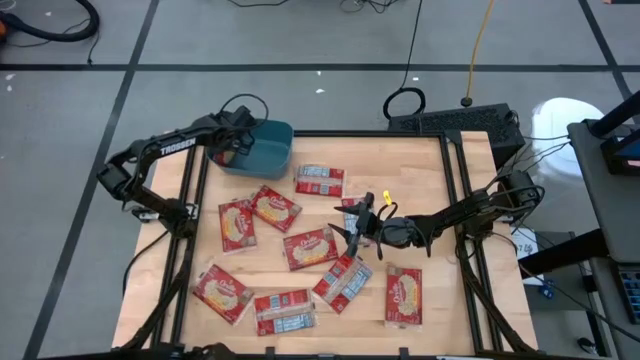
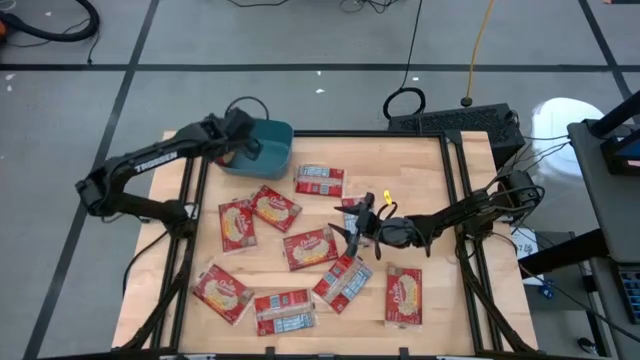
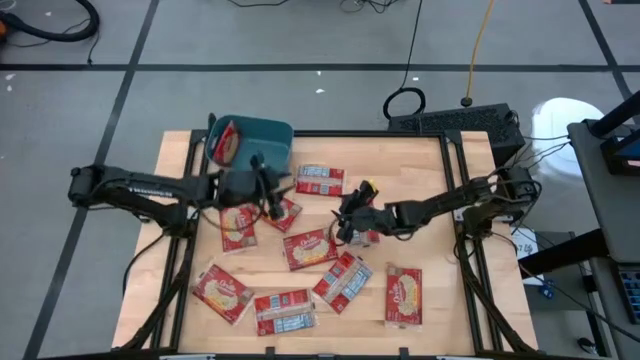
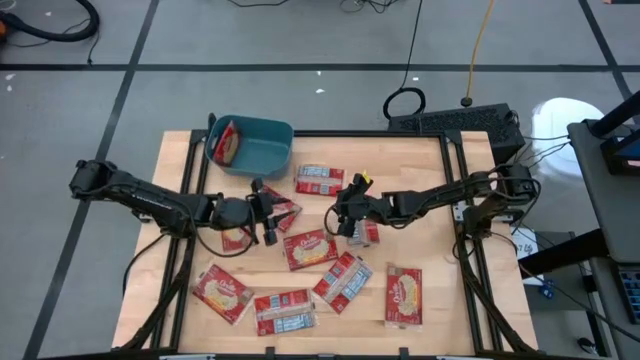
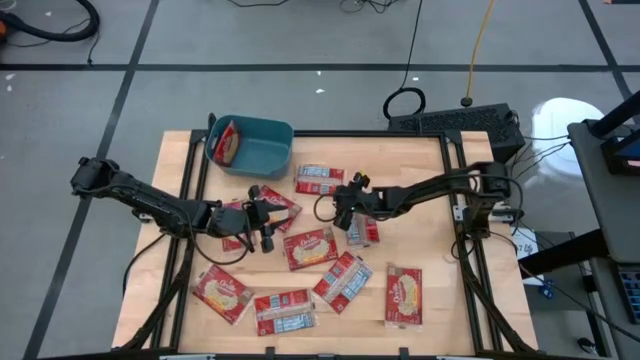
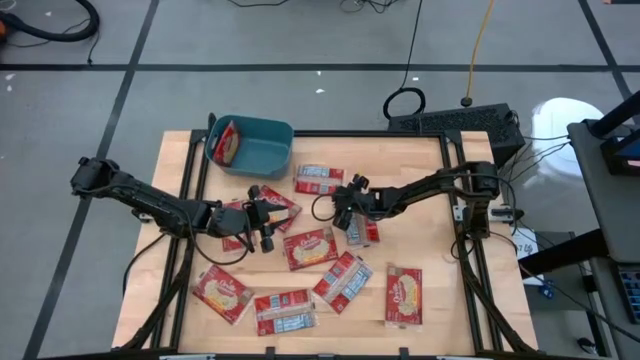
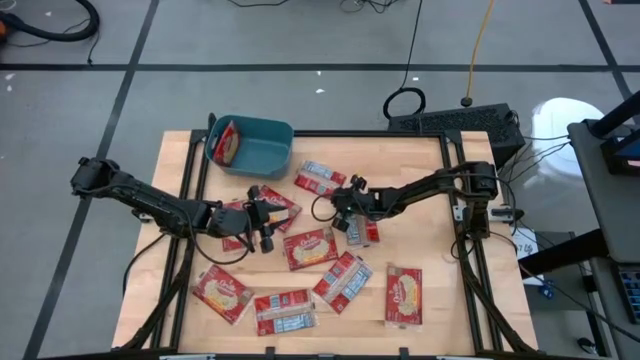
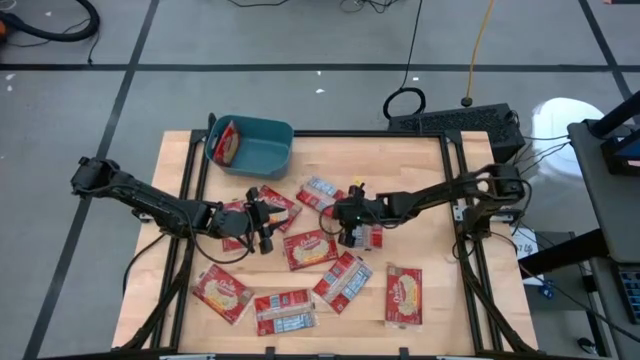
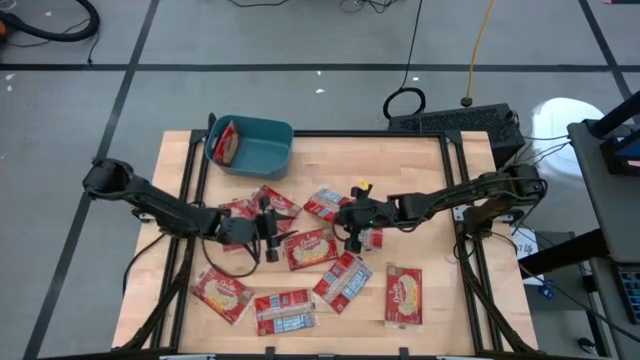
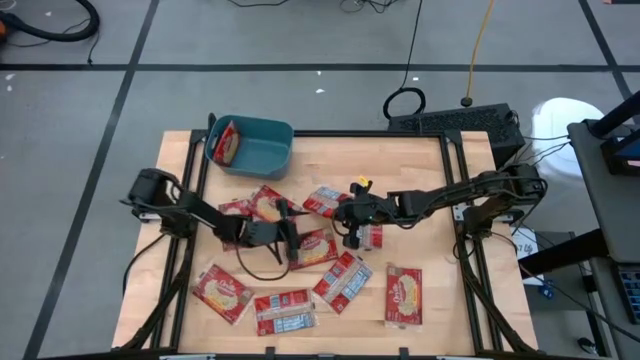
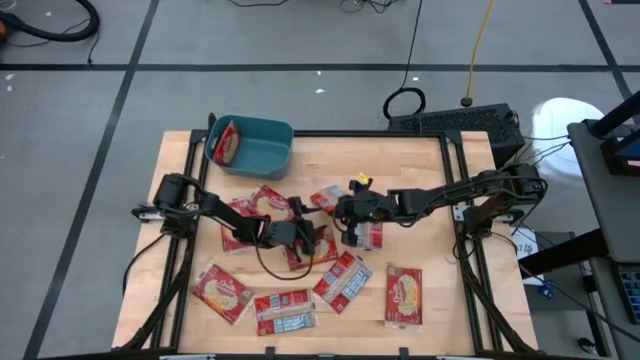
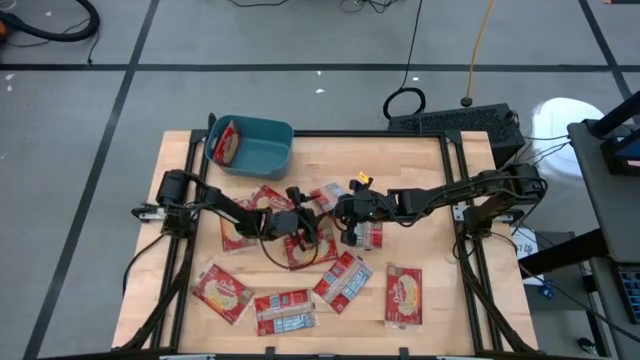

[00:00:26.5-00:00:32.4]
Task: Sort popcorn bags into baskets
Put the red popcorn bag into the blue bin

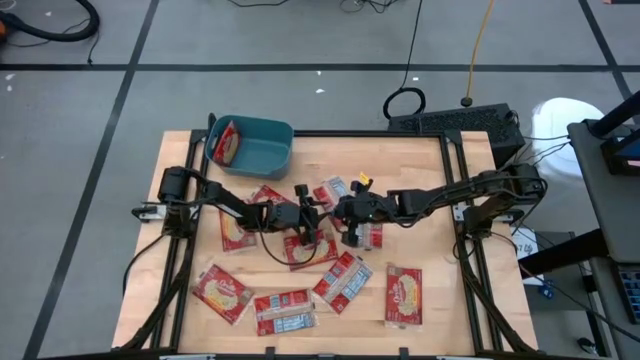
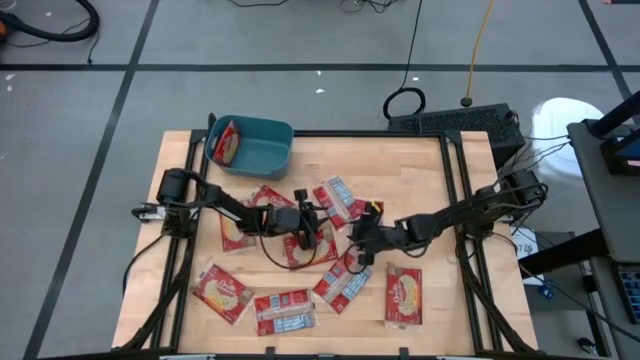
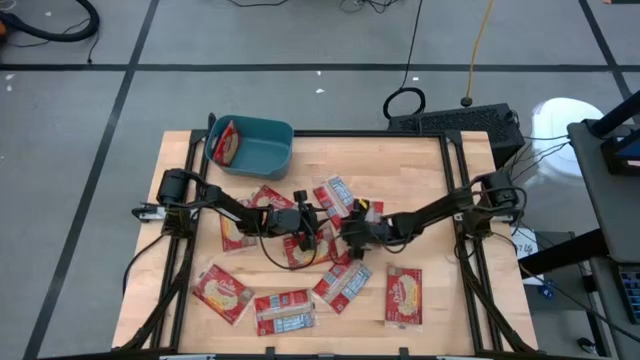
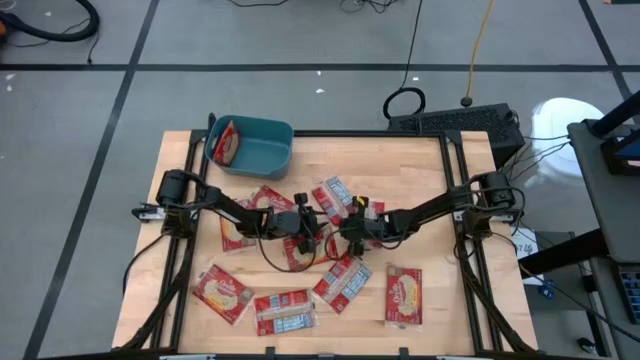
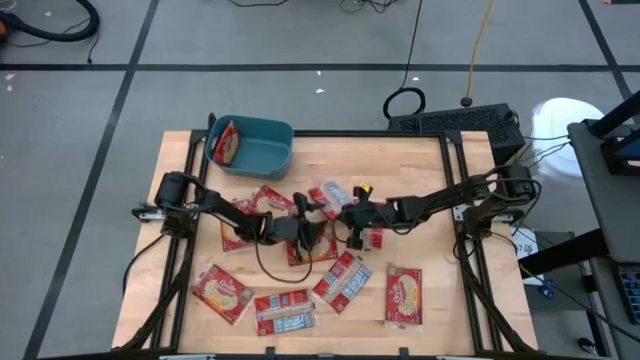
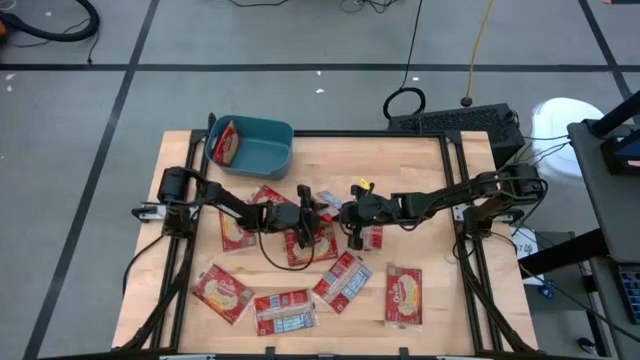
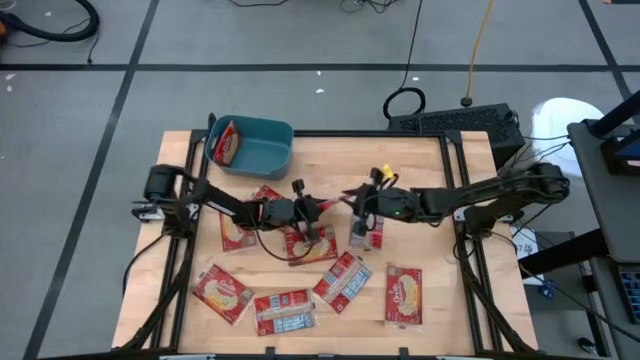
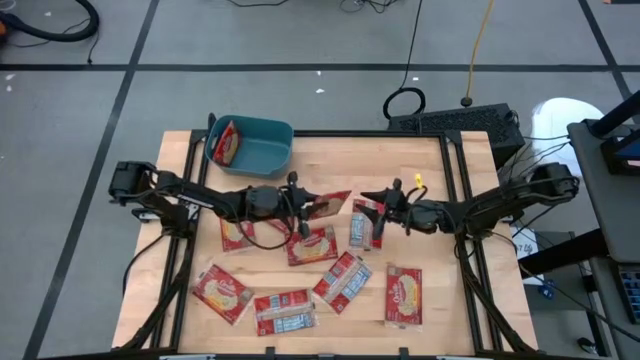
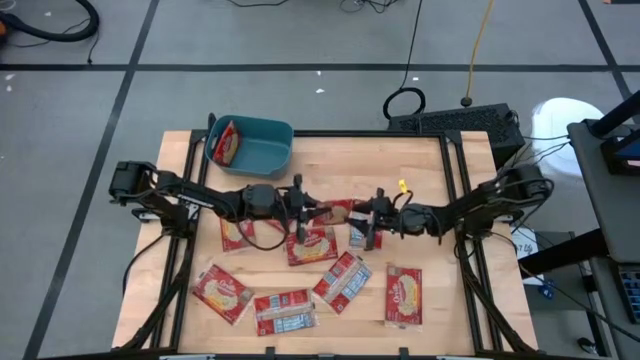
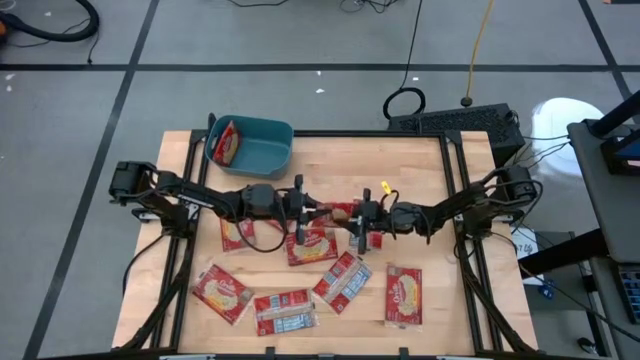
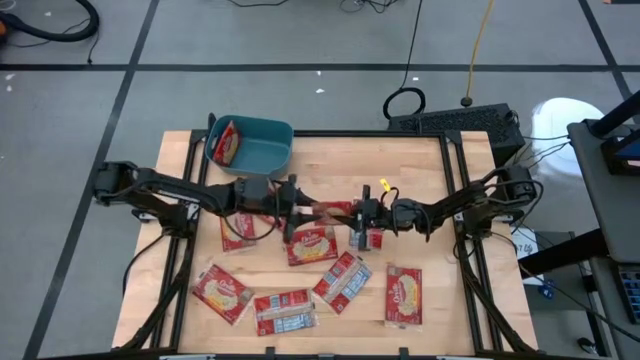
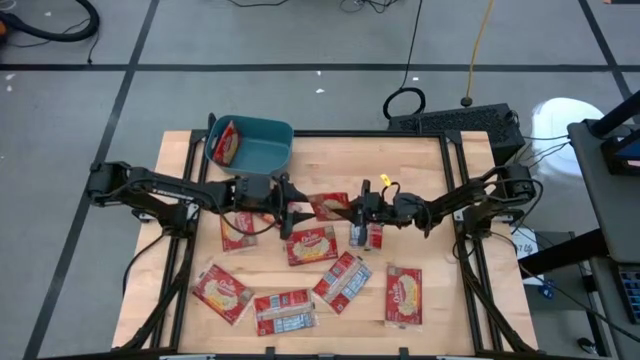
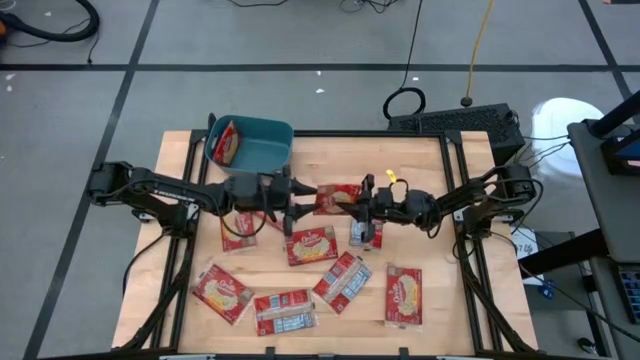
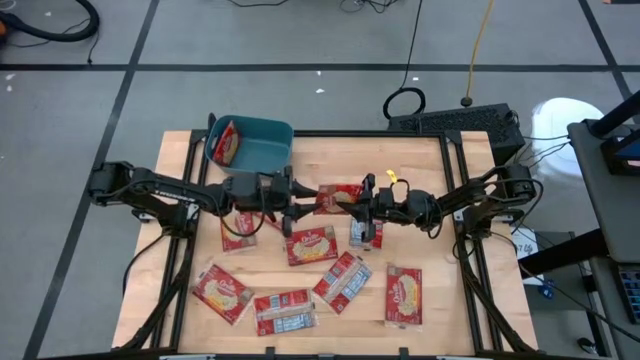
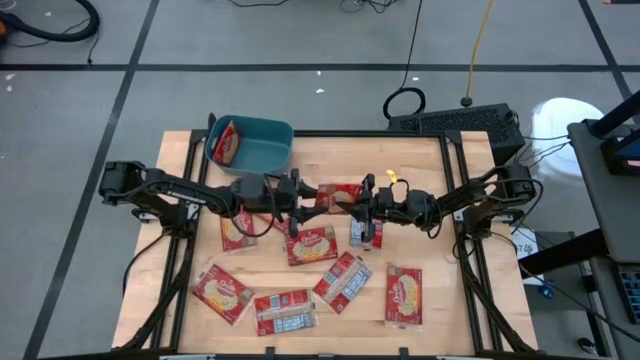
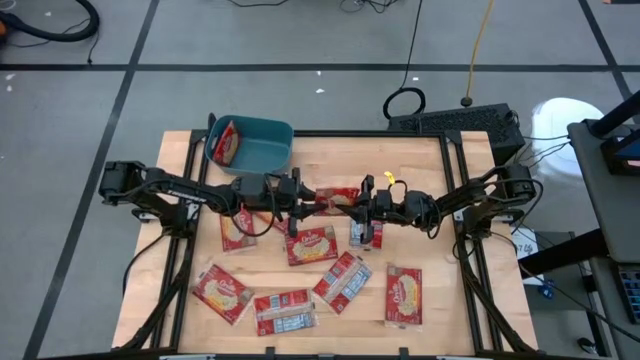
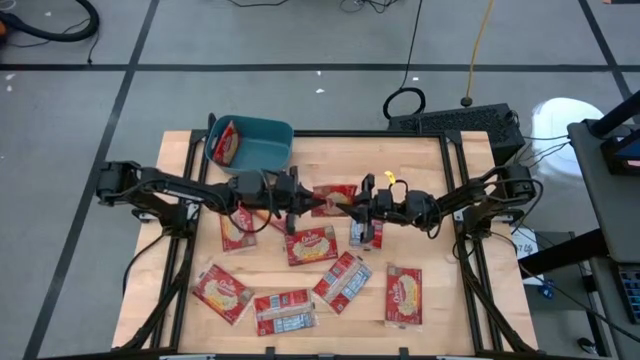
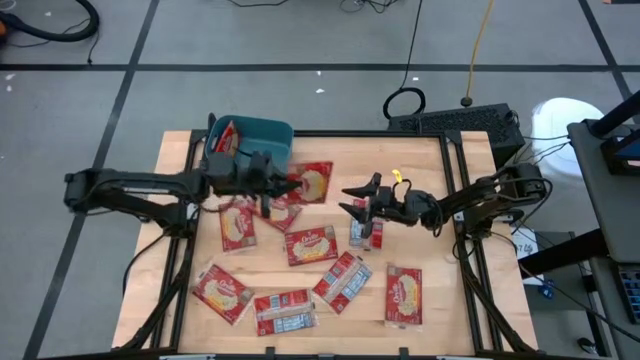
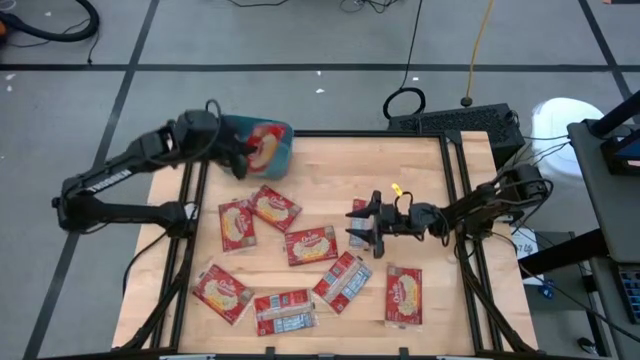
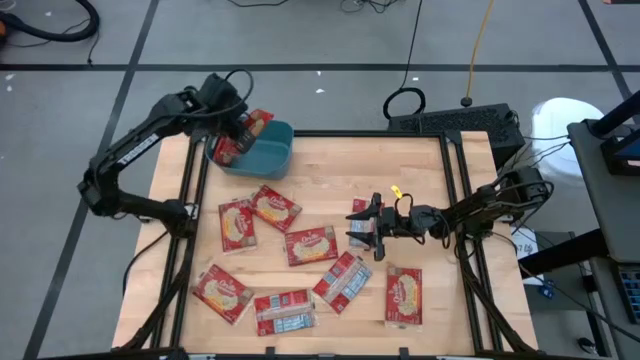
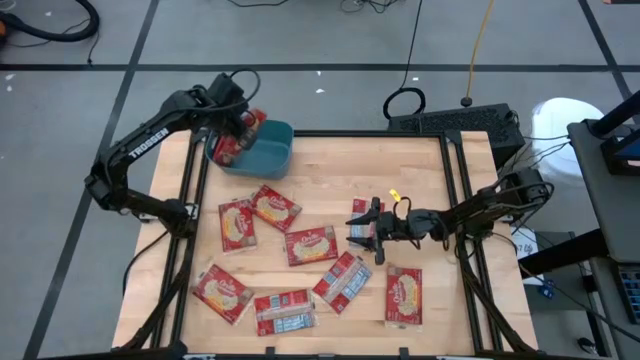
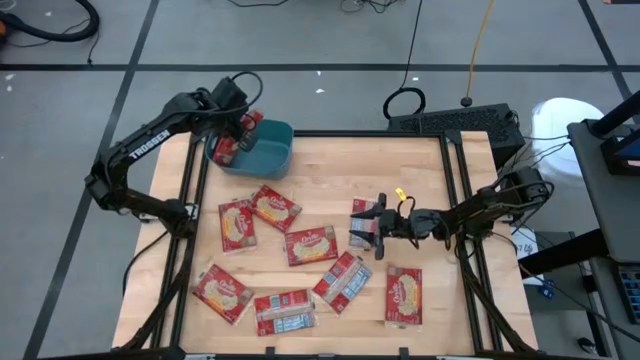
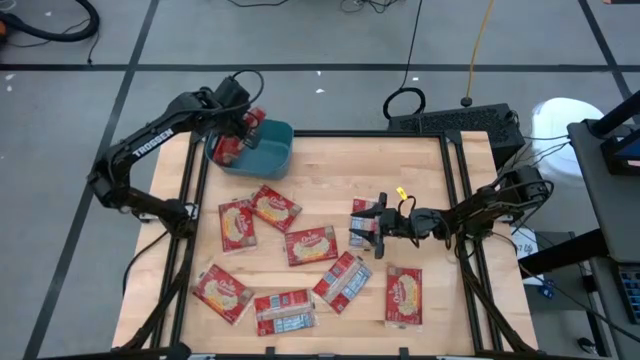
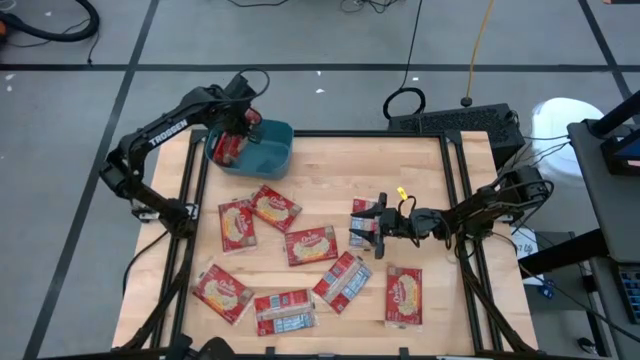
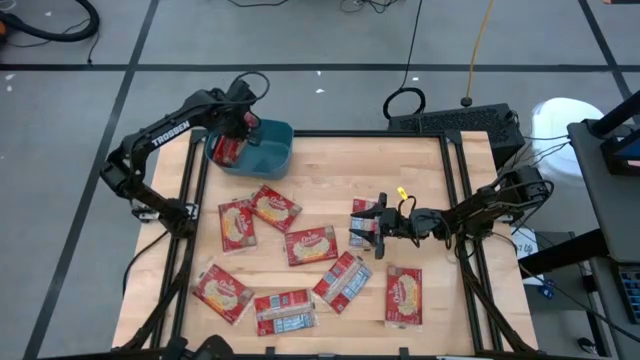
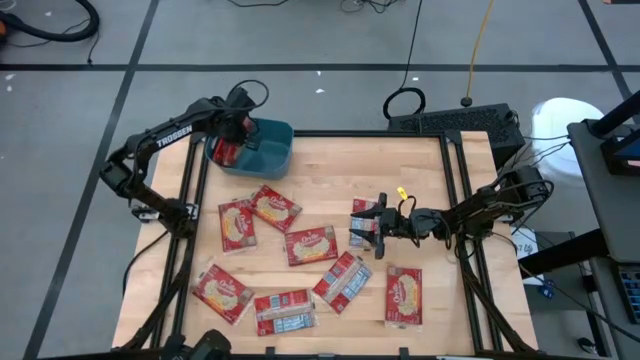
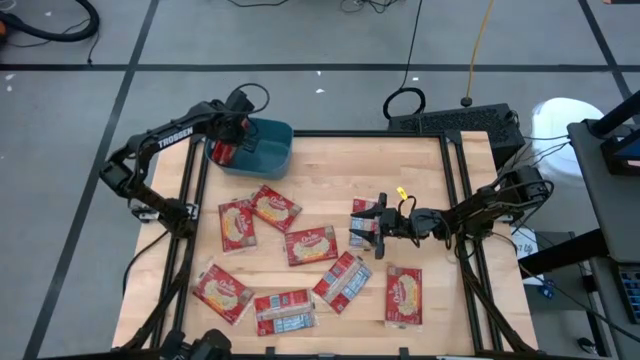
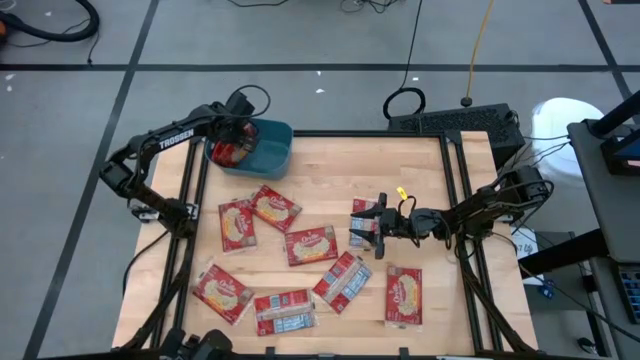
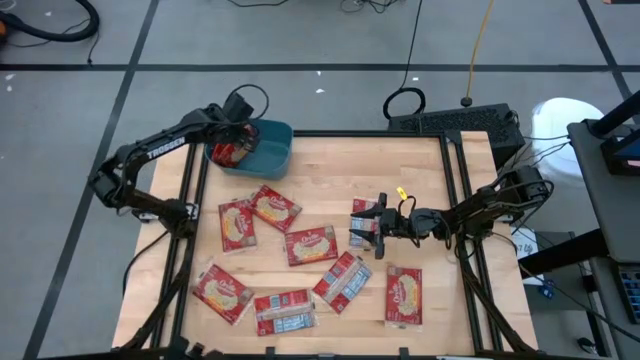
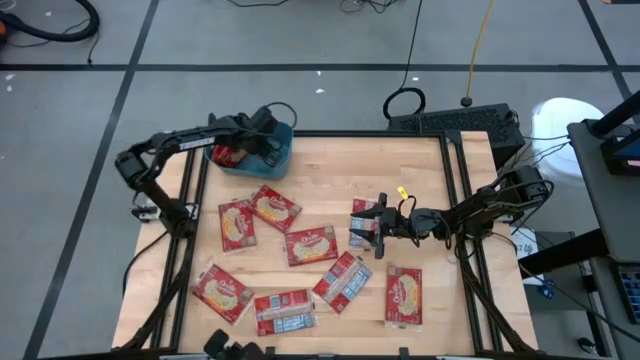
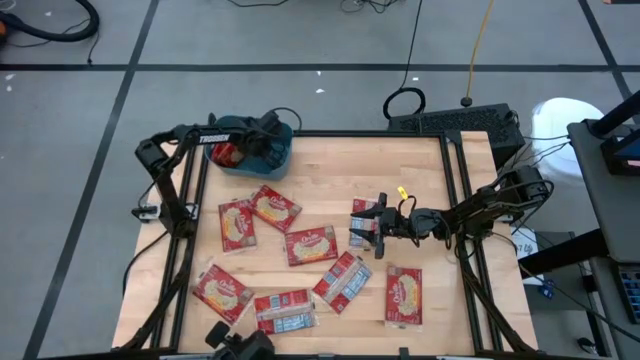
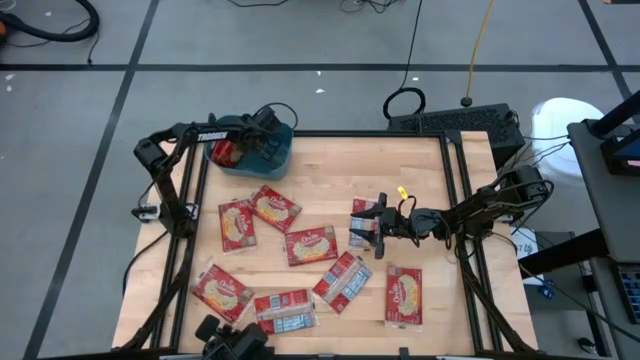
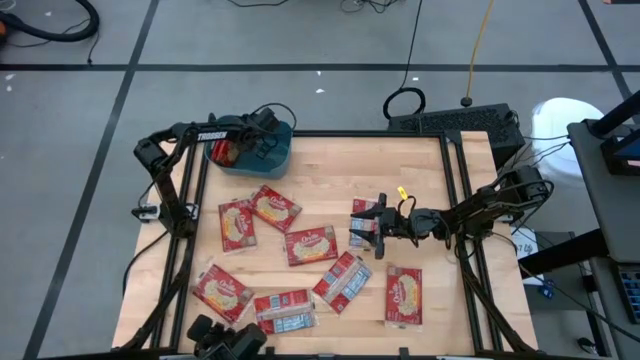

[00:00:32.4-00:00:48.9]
Put the red popcorn bag into the blue bin
